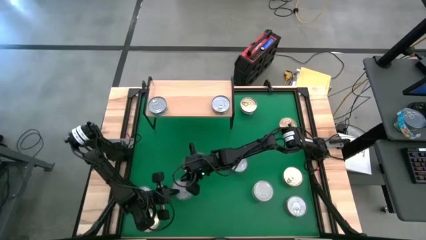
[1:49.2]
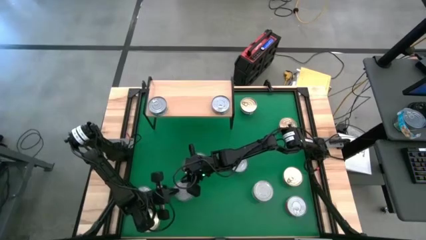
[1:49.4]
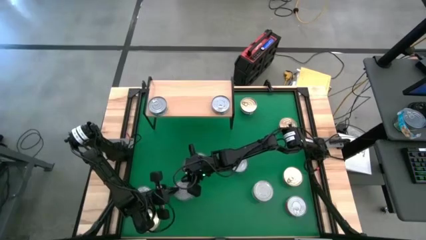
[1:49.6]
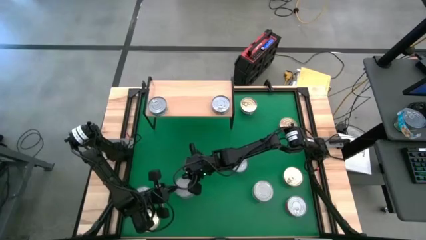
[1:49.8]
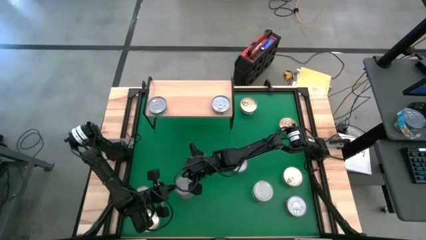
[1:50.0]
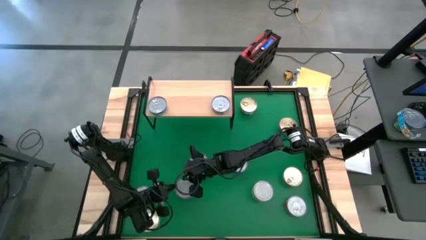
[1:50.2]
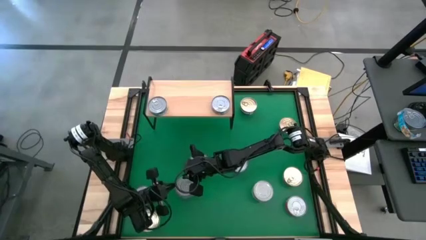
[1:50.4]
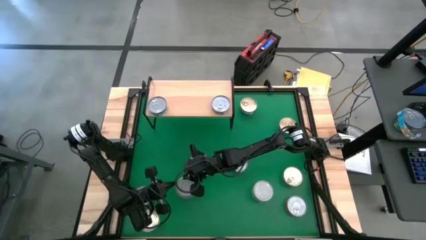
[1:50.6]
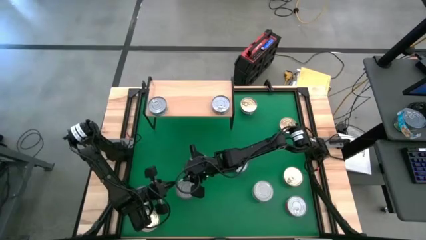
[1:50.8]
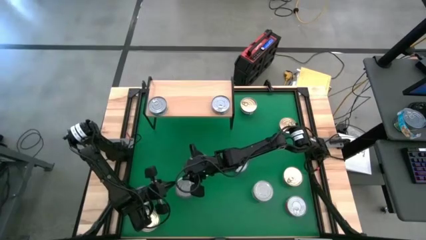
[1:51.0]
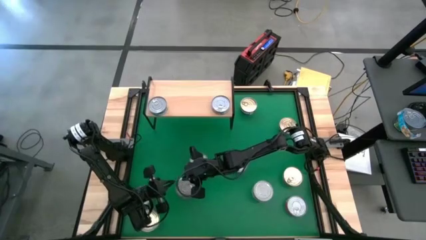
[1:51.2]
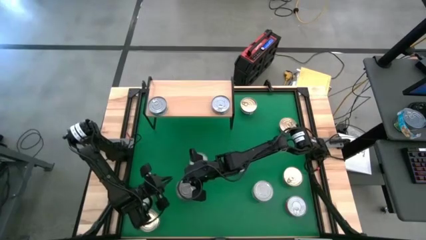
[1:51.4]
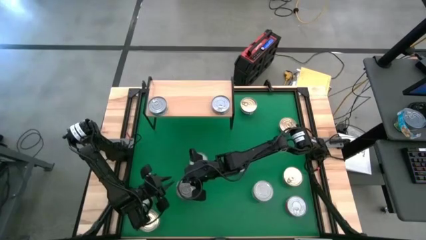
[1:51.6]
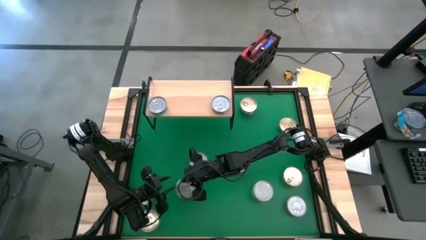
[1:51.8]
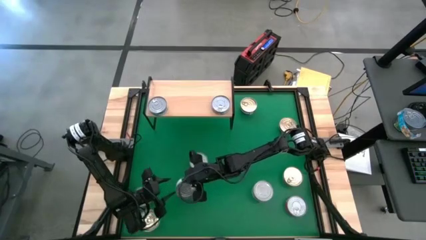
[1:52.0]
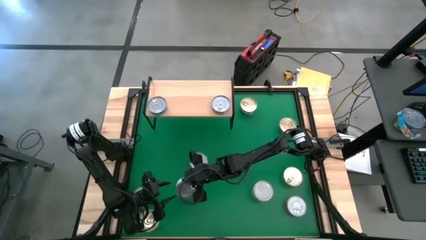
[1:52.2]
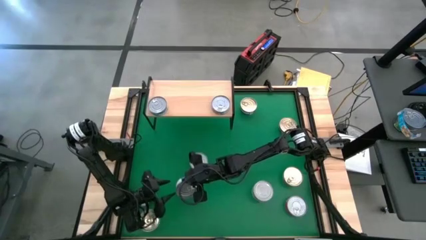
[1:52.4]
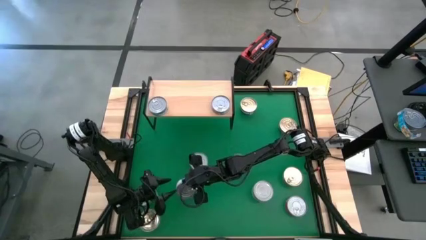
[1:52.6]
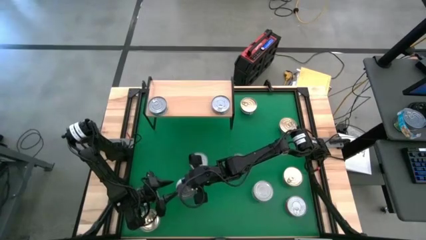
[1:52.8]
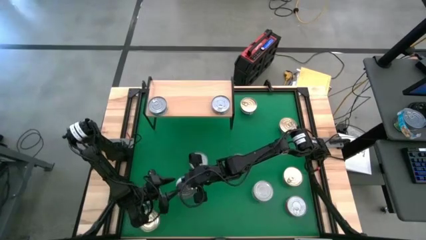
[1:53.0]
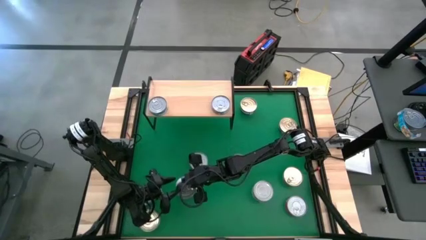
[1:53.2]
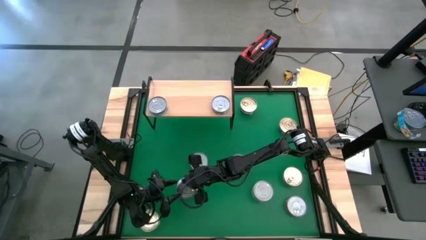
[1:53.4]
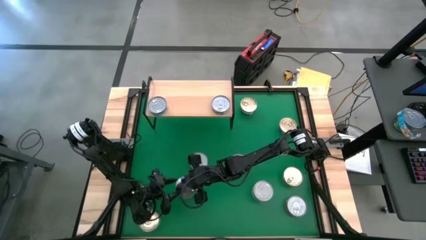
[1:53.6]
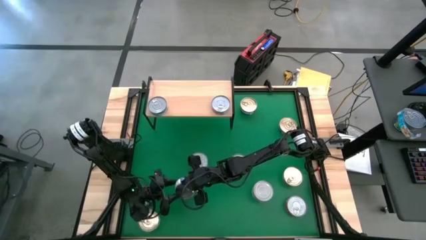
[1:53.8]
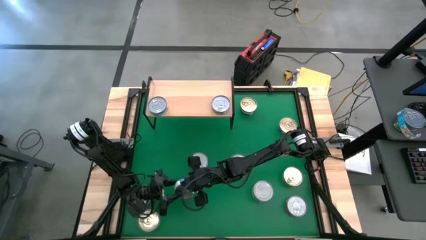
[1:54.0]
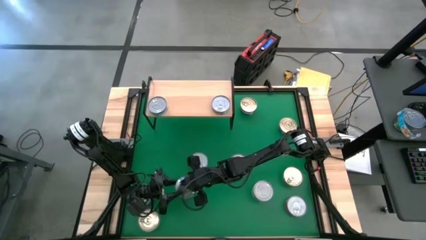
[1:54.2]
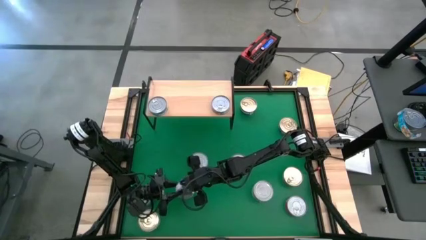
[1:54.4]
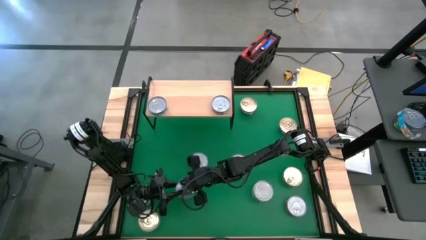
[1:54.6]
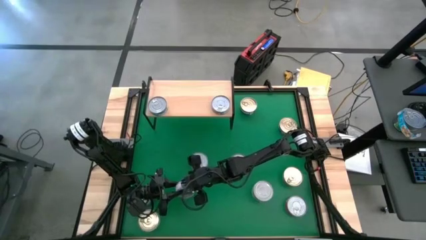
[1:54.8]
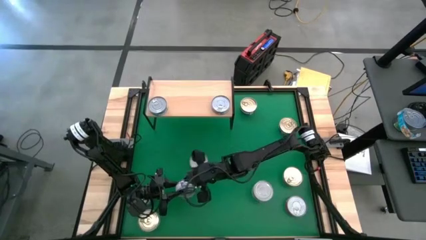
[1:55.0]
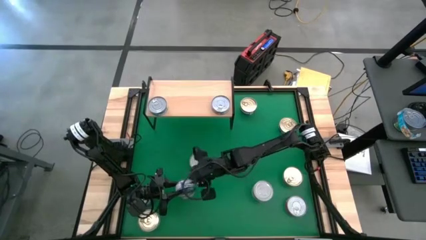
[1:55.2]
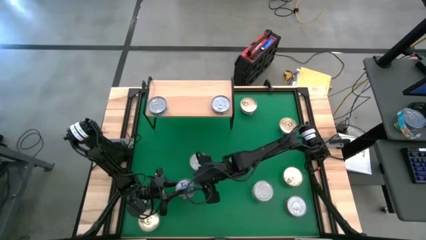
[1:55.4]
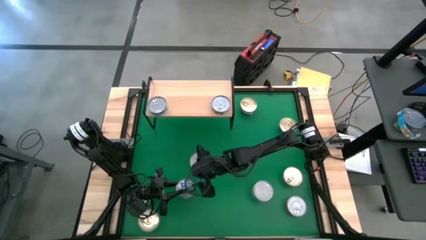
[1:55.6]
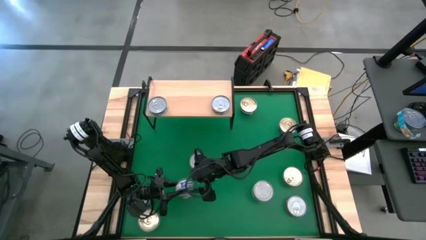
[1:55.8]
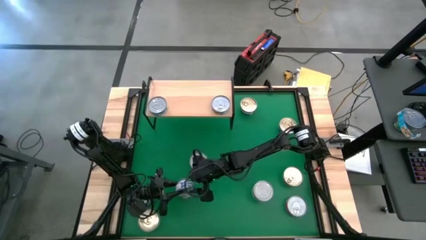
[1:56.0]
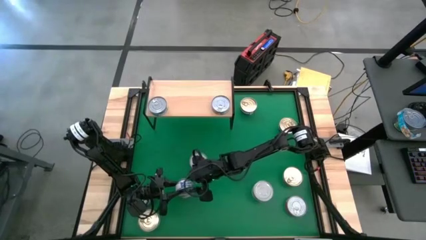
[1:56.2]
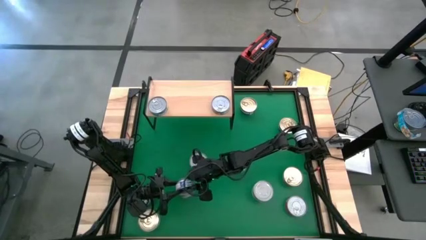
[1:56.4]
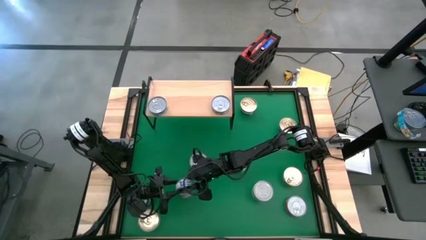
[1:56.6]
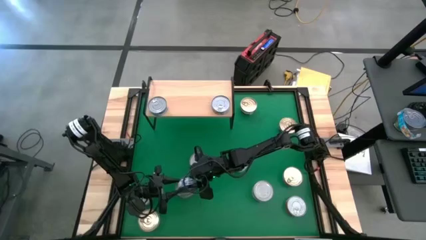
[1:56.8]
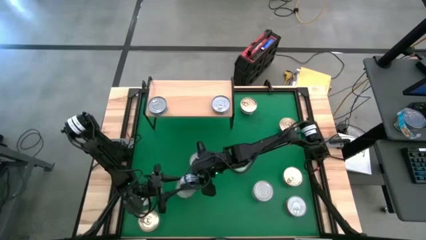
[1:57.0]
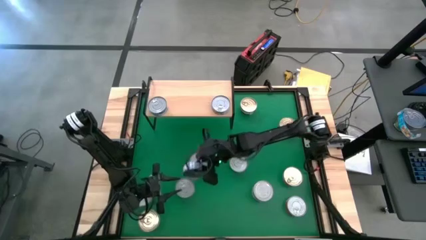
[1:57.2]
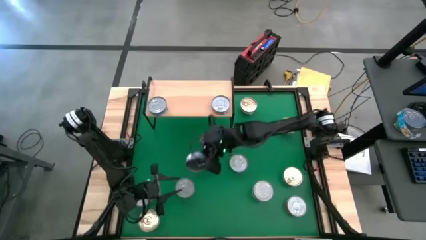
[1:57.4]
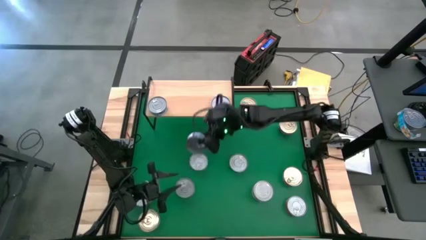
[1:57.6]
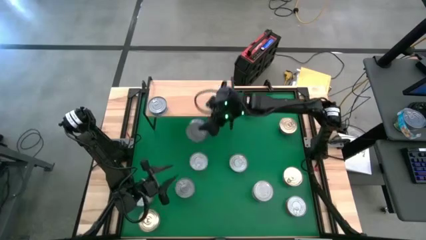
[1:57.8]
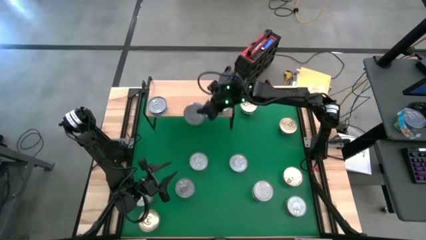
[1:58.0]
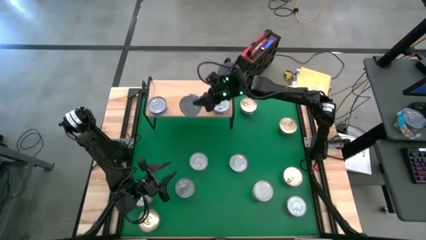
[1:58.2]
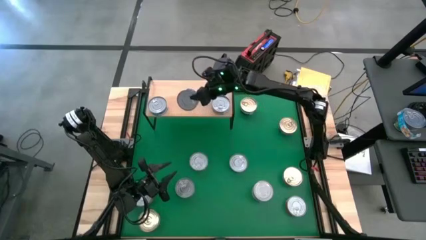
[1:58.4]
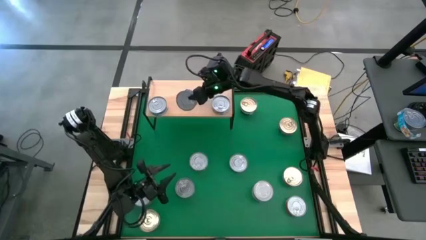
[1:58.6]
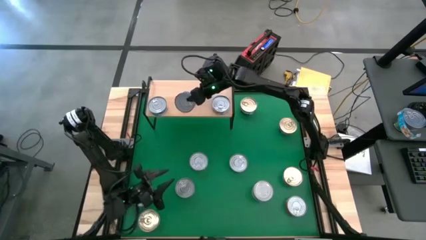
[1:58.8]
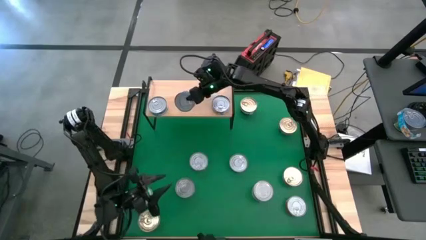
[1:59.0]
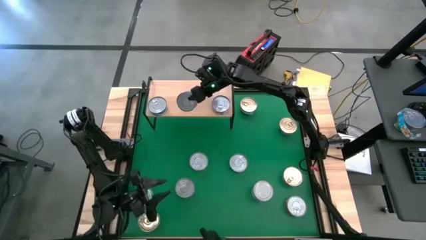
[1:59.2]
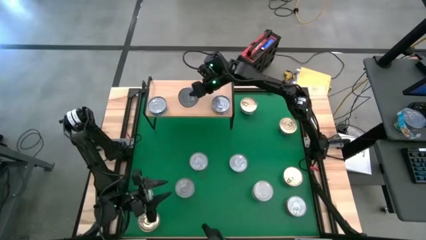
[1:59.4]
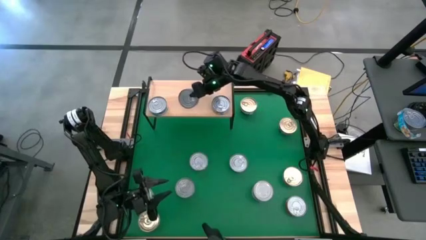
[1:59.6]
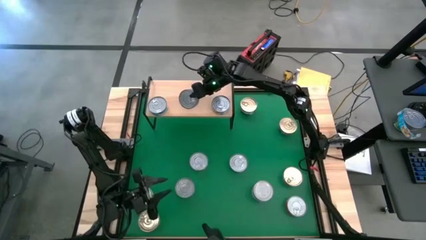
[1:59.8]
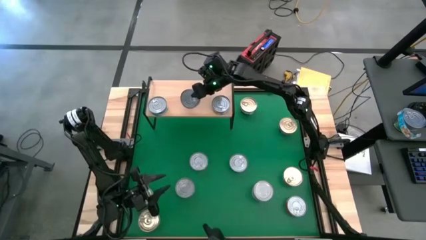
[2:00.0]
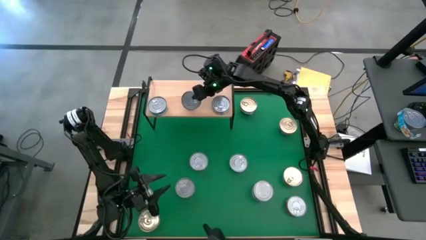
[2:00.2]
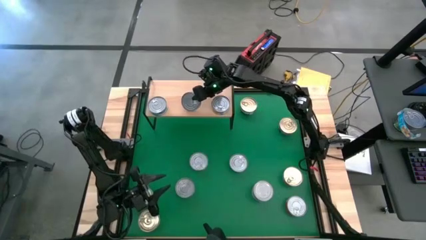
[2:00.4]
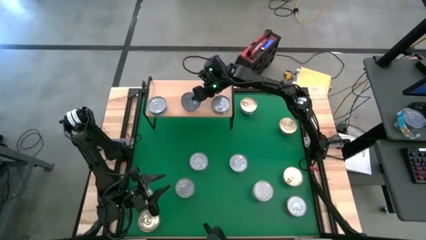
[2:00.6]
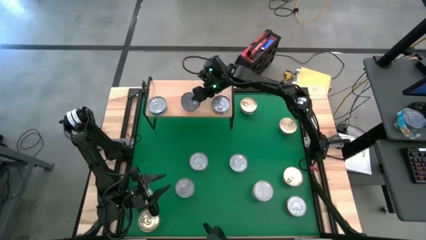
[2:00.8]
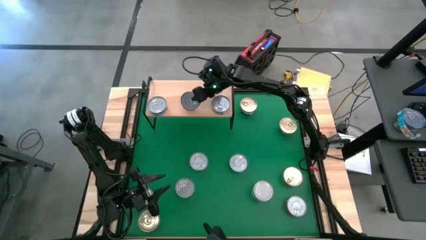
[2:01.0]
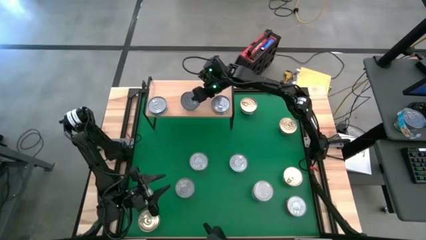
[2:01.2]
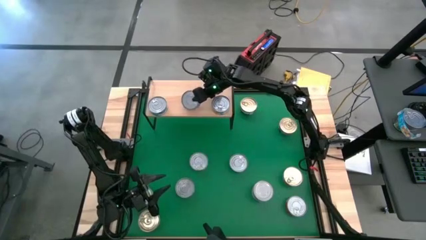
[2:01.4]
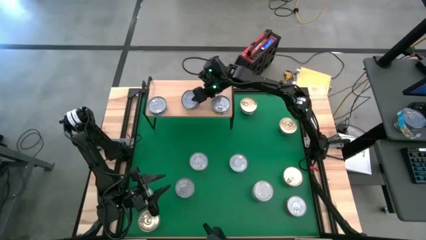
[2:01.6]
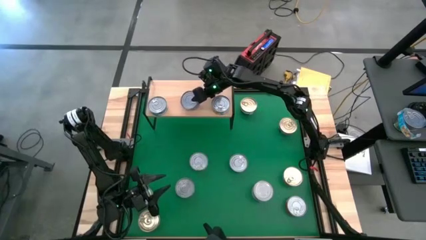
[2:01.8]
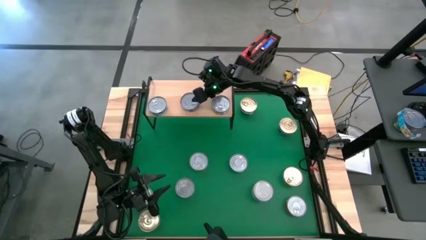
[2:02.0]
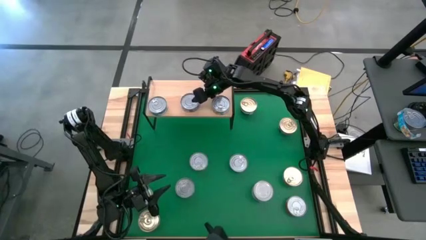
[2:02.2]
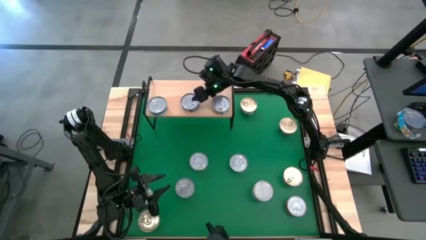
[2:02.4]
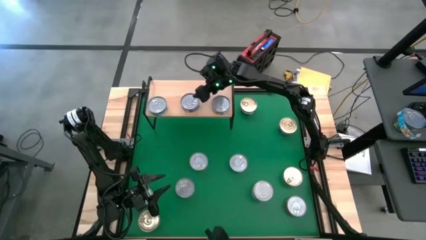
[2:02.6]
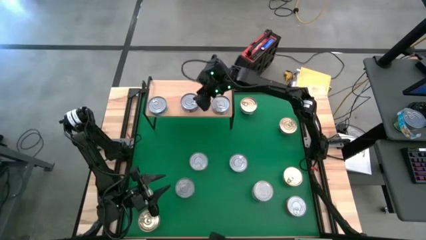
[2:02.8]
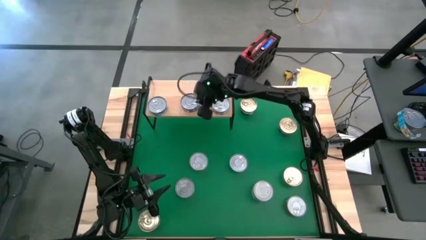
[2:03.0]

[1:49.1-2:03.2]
Task: Stack canned seafood by type on shelf
Put the middle left dark blue tuna can on the shelf
